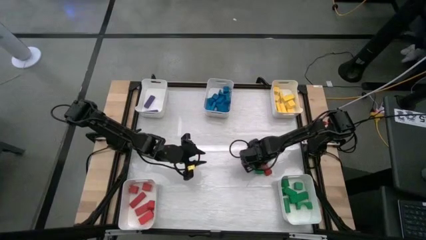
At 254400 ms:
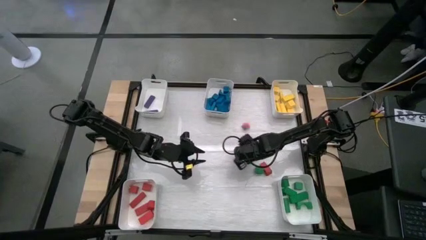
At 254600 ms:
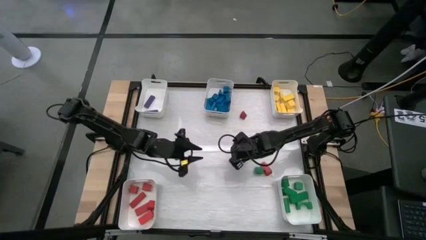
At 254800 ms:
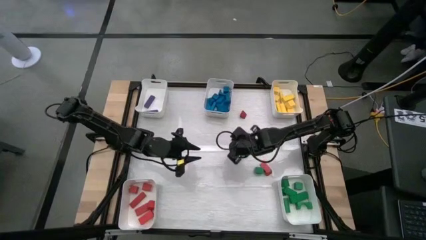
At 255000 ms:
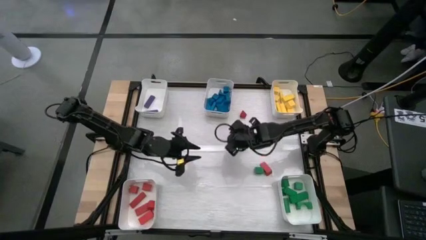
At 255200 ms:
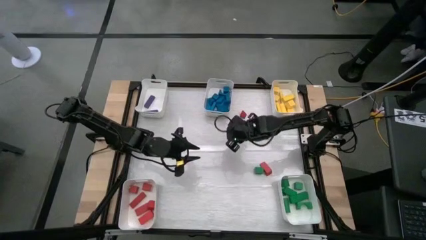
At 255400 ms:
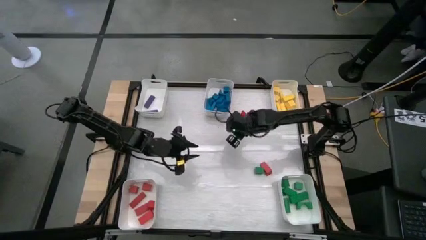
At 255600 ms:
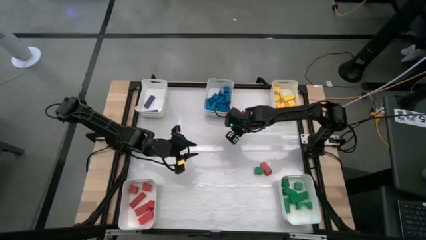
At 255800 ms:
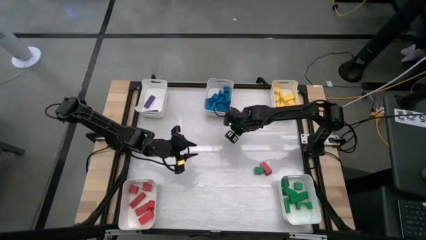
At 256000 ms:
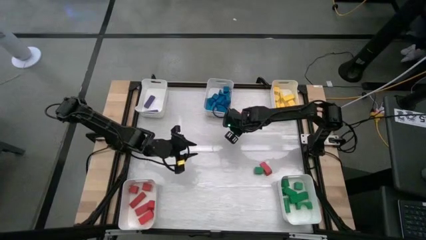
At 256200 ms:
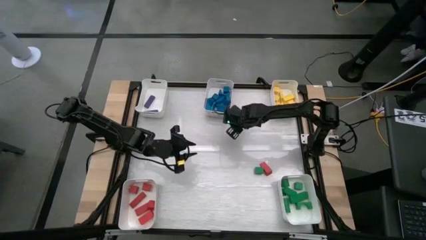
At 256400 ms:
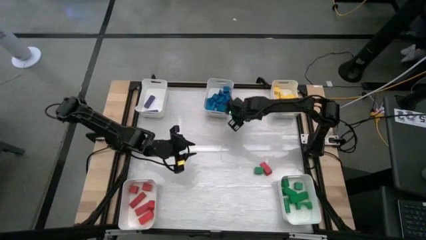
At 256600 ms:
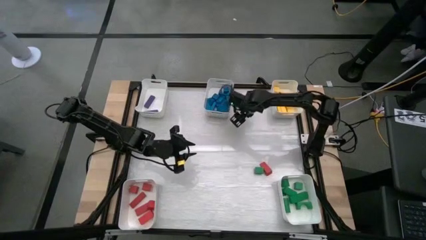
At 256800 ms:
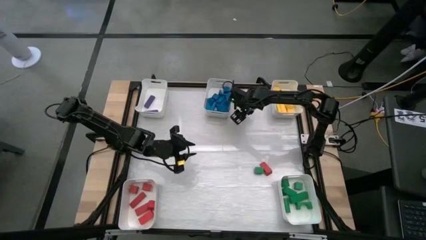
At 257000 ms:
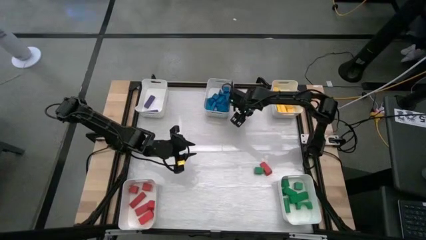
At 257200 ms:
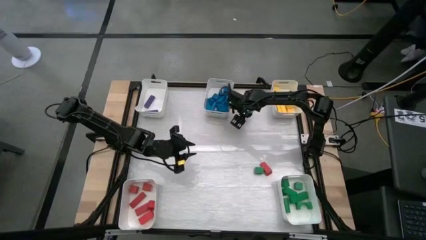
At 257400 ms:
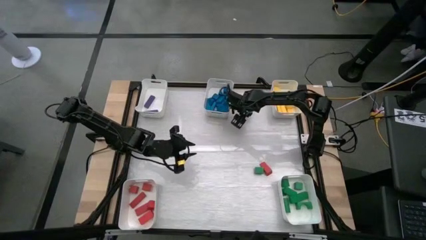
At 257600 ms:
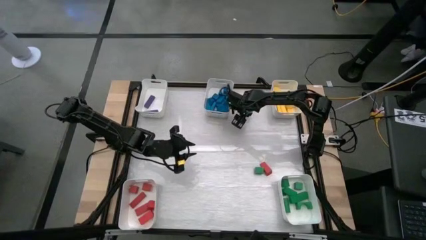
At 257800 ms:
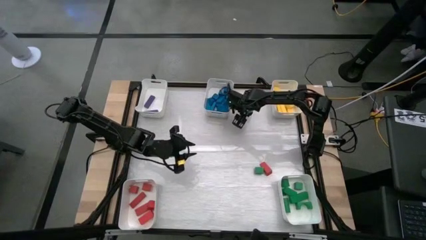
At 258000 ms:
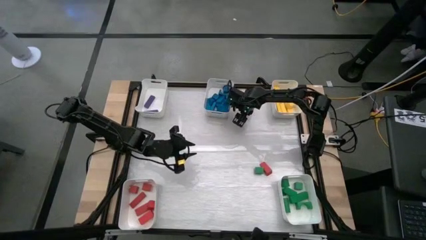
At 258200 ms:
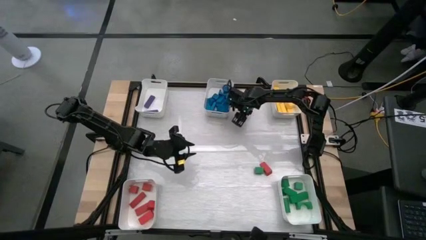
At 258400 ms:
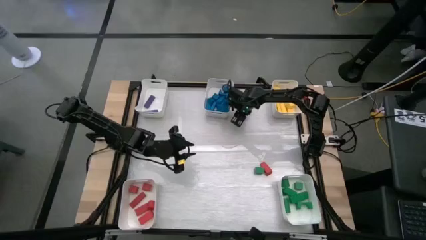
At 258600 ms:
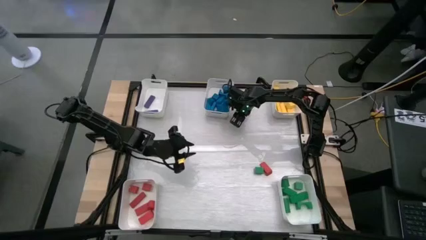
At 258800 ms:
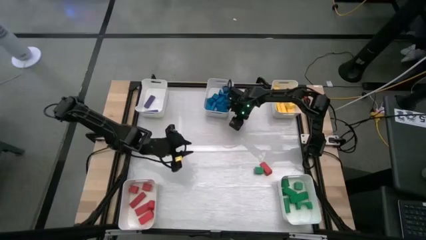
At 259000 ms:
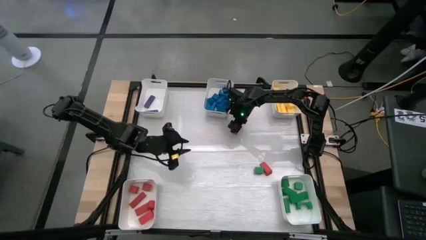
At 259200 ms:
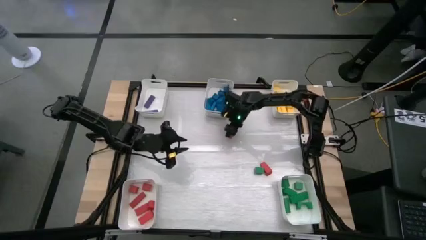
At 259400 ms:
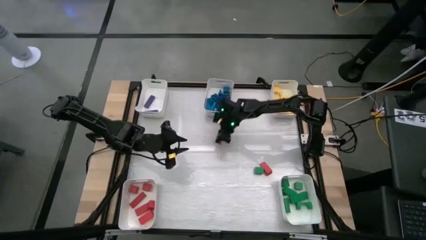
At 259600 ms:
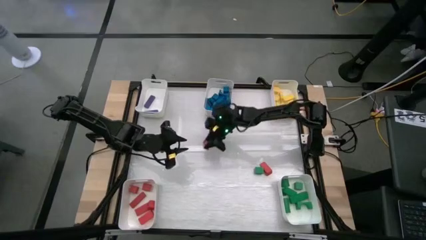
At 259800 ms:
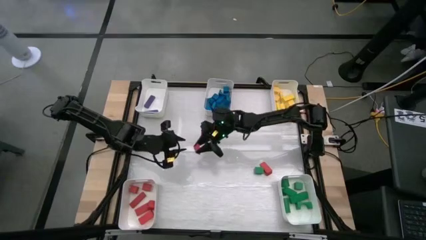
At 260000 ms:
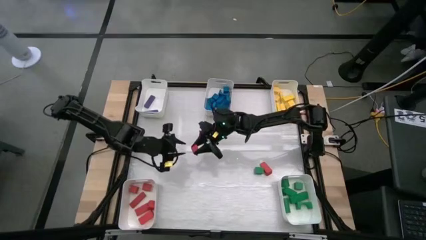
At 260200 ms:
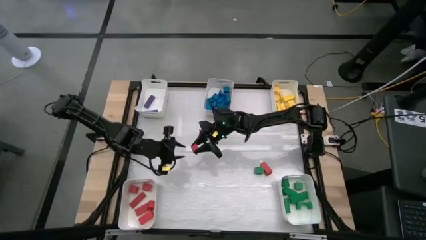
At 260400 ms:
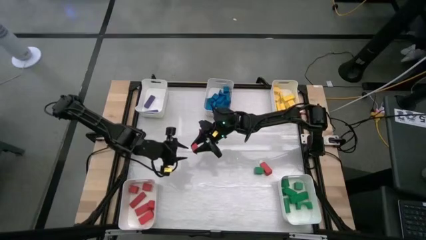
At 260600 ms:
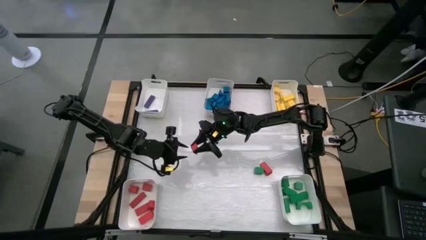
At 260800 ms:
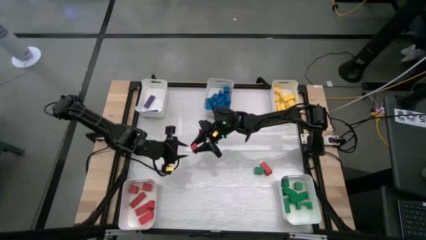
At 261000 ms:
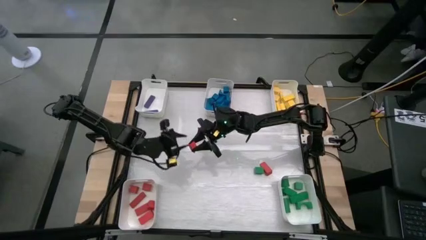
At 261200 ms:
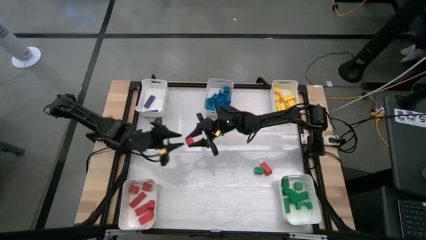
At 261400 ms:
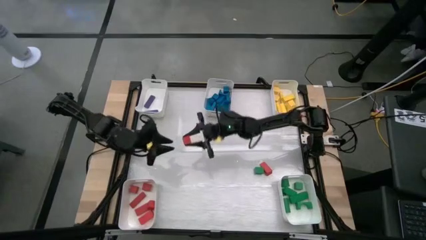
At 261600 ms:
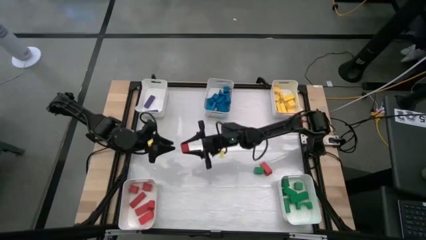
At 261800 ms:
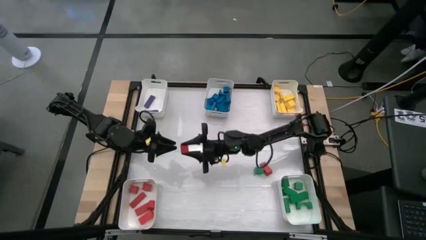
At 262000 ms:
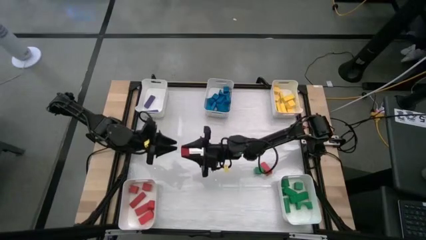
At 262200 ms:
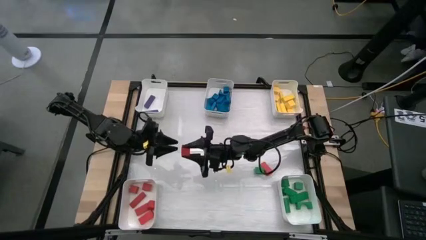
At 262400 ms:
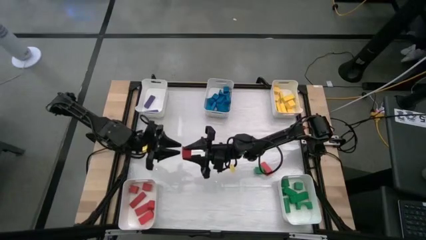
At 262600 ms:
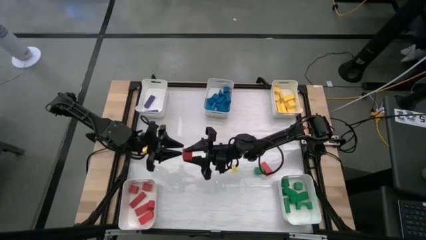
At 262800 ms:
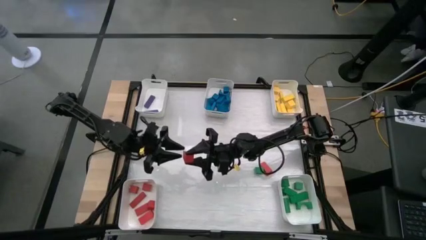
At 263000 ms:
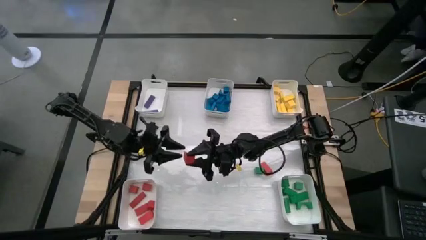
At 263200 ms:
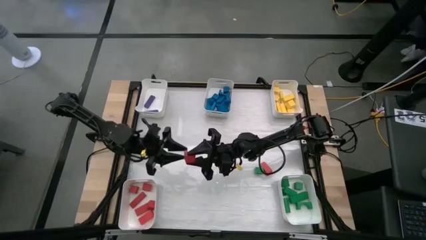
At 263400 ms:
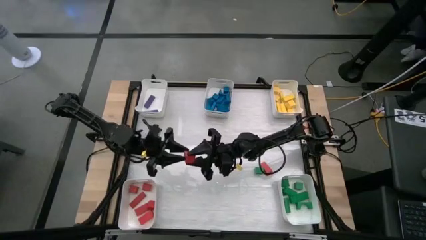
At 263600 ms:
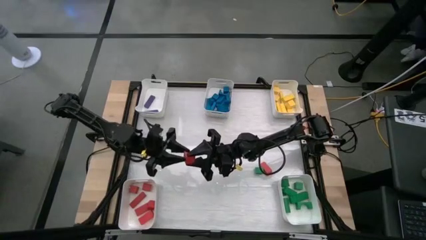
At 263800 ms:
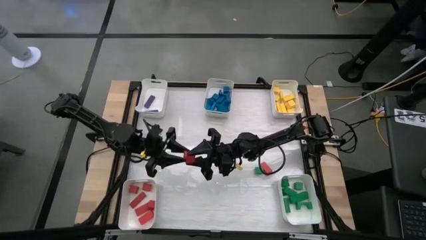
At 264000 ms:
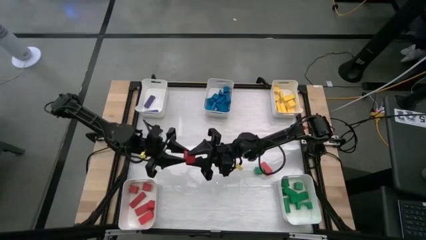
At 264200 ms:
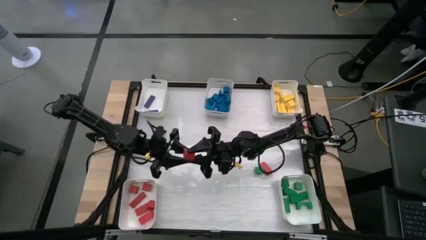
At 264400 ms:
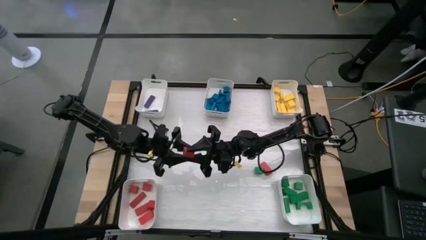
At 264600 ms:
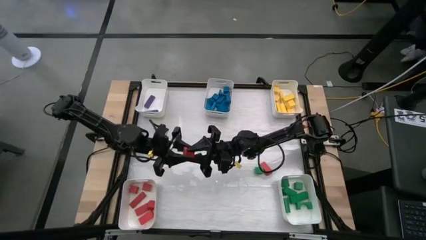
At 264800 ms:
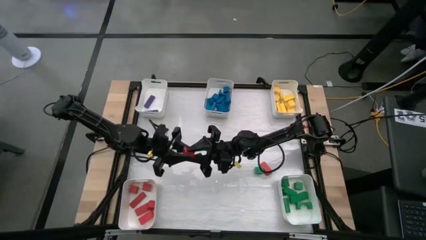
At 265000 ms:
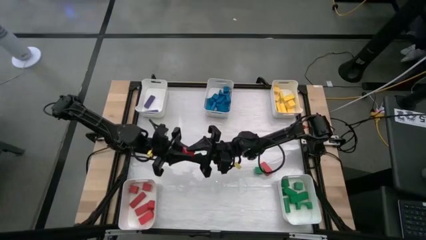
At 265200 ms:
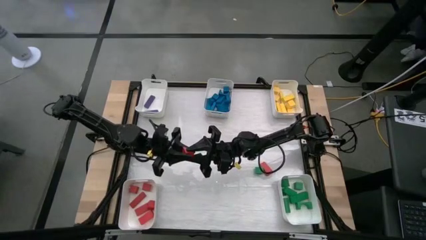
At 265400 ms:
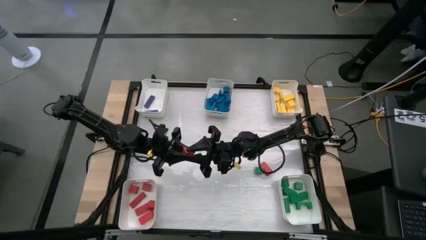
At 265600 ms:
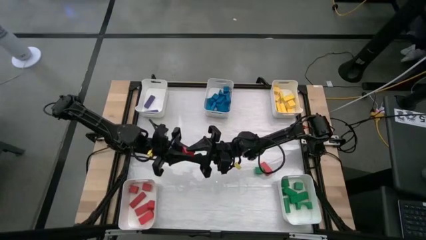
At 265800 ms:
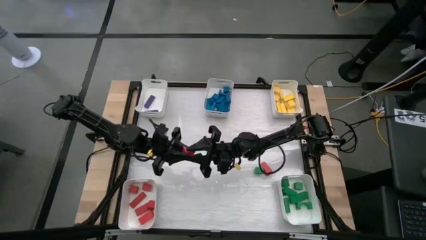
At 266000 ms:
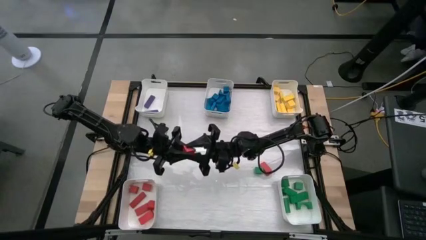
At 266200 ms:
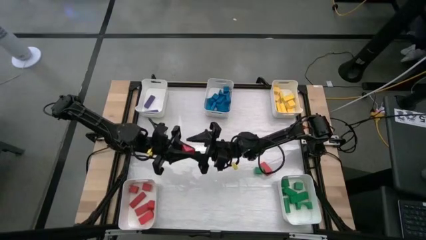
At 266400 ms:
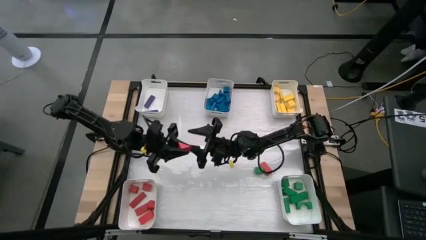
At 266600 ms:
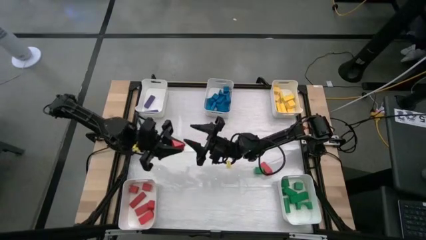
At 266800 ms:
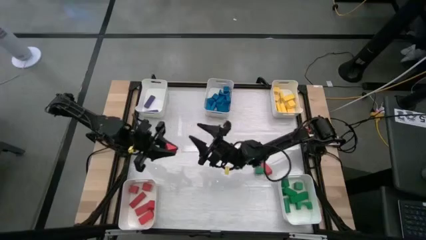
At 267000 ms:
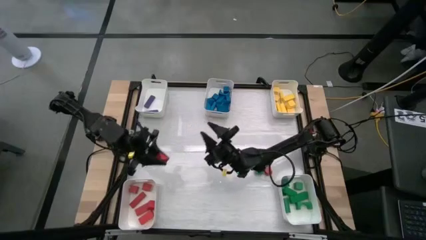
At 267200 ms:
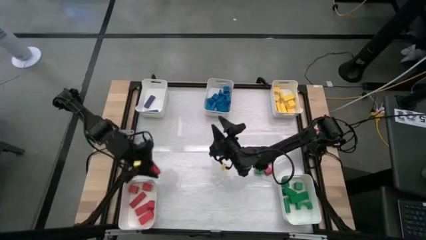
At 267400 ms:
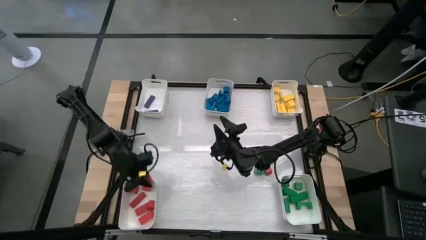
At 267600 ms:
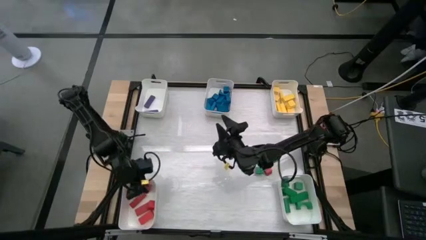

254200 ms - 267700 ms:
Task: Sort blocks
Put the red block into the bottom left white bin

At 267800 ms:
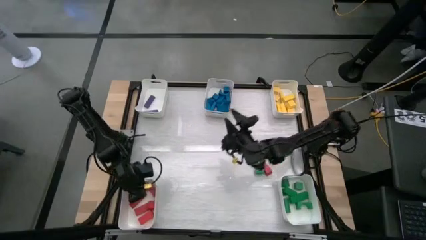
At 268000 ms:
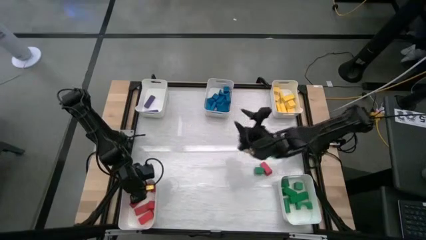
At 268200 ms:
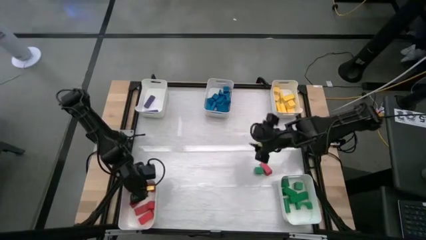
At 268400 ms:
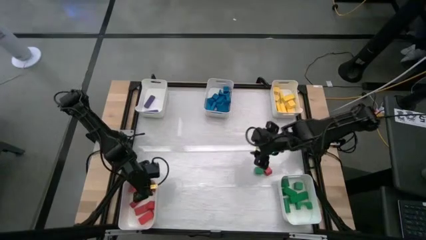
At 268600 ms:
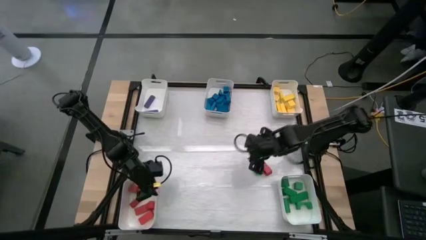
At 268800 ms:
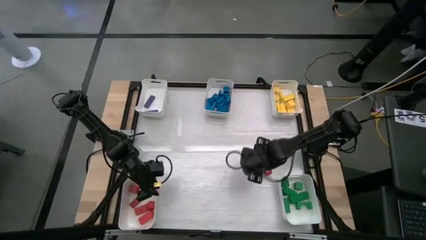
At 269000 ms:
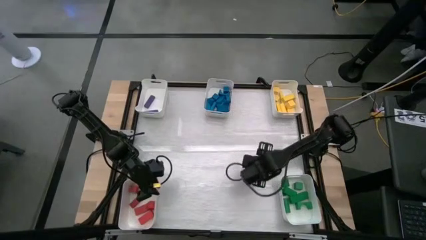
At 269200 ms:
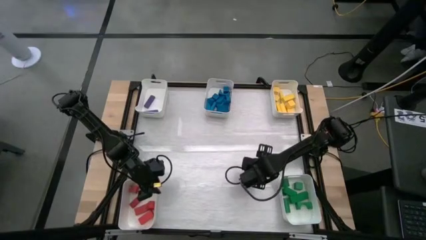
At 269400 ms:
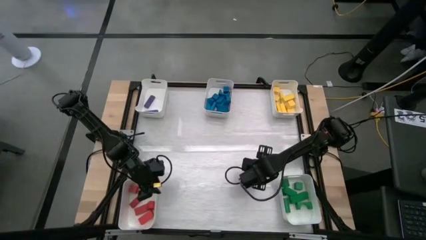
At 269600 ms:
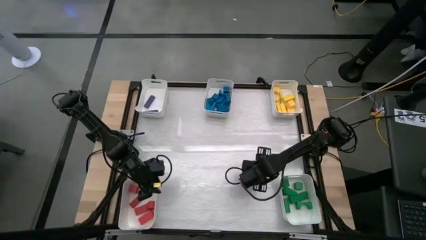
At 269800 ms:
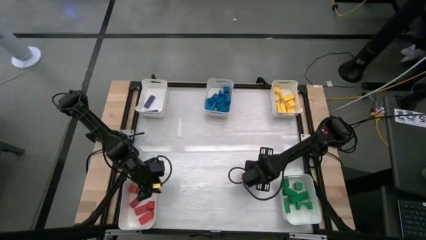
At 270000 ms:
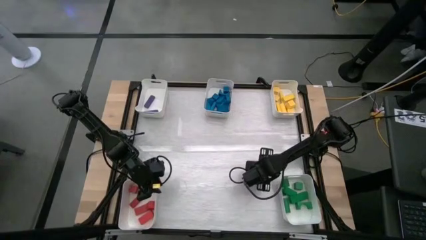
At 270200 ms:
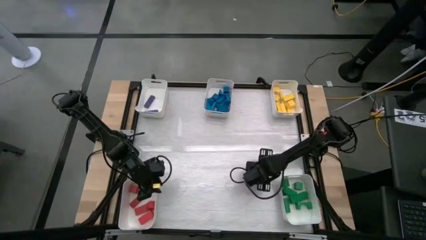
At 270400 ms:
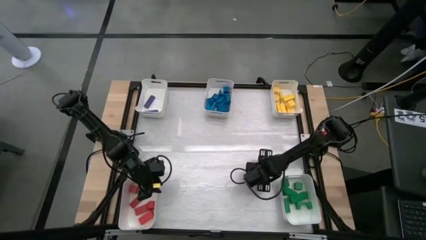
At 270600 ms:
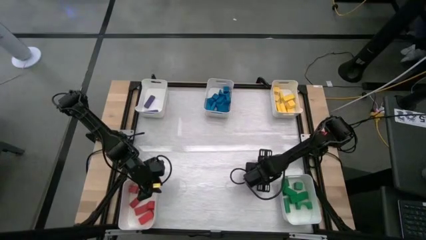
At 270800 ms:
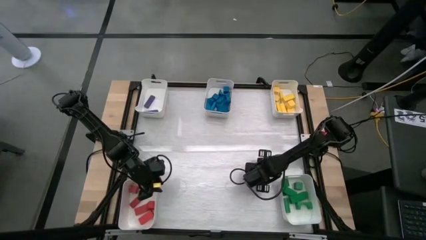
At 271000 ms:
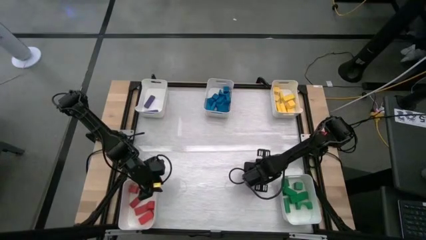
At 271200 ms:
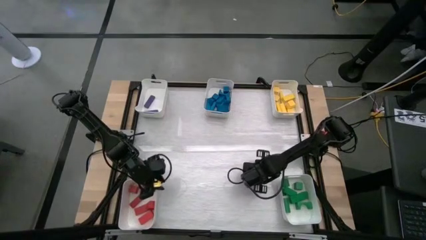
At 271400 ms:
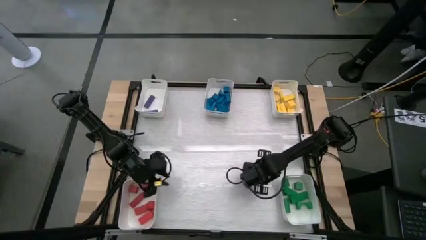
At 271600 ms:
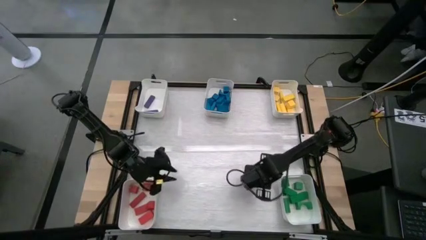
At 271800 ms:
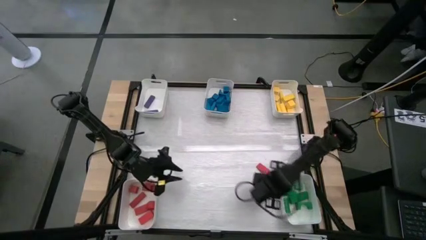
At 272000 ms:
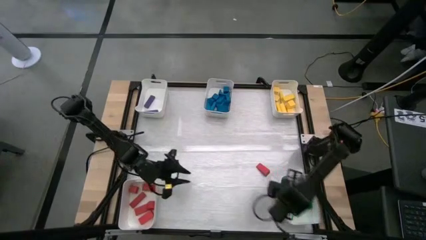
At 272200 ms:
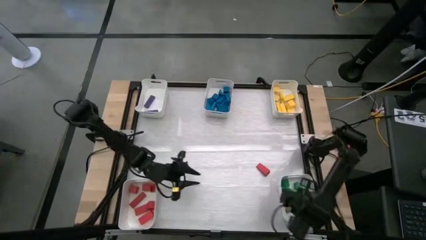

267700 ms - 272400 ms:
Put the green block into the bottom right white bin
